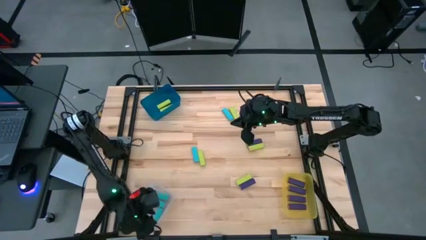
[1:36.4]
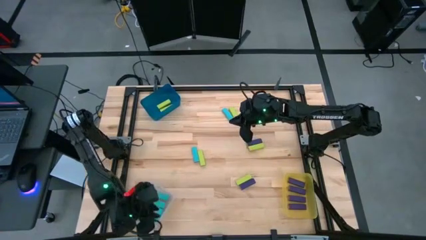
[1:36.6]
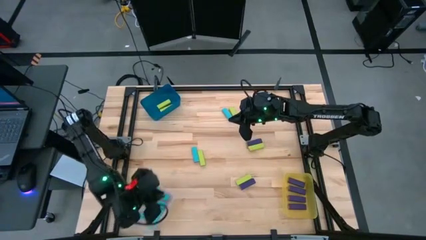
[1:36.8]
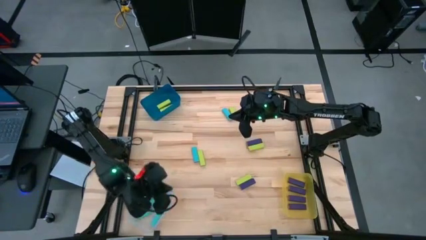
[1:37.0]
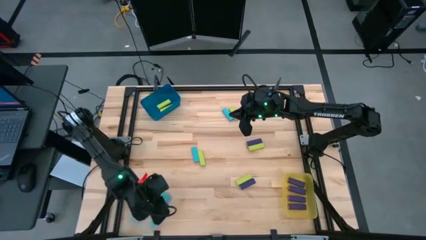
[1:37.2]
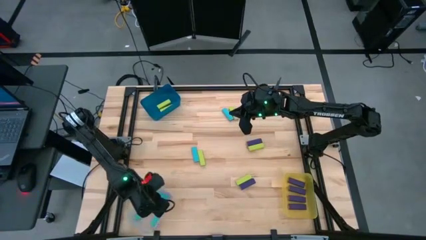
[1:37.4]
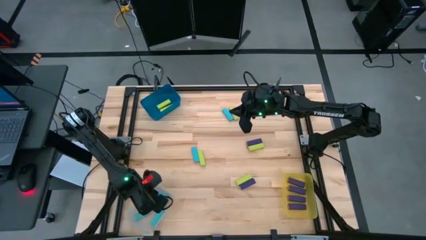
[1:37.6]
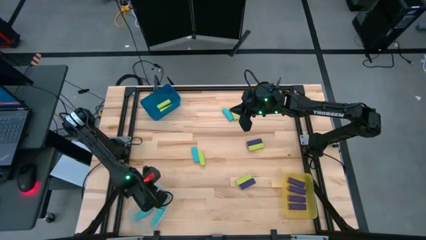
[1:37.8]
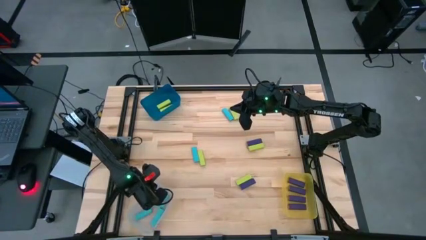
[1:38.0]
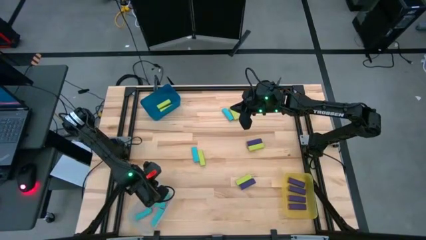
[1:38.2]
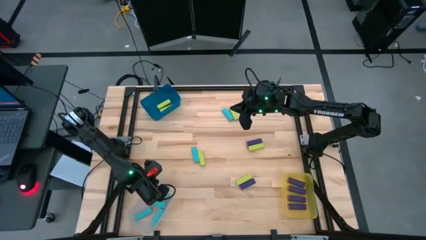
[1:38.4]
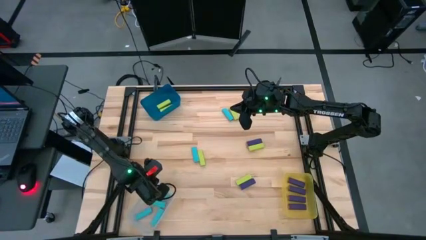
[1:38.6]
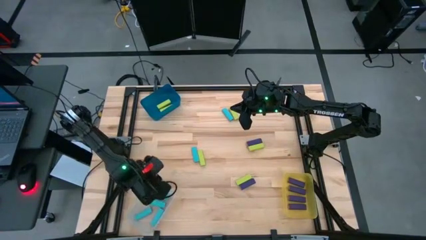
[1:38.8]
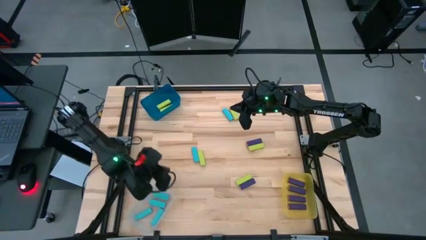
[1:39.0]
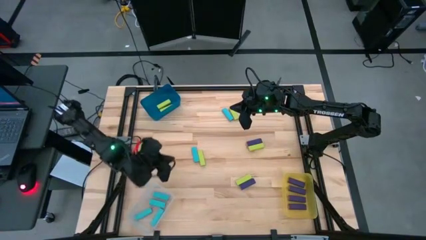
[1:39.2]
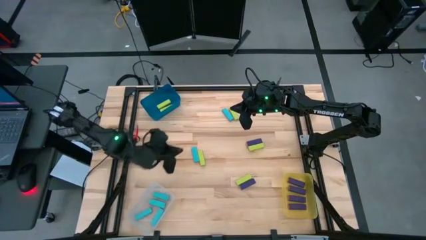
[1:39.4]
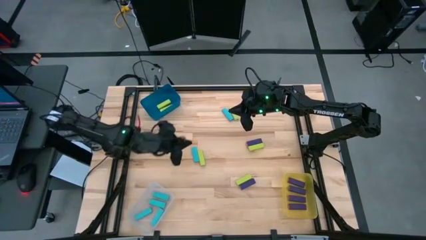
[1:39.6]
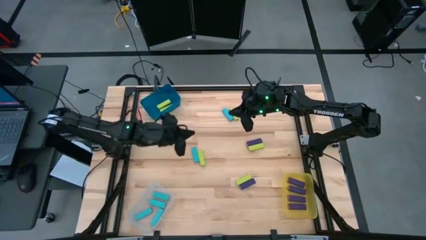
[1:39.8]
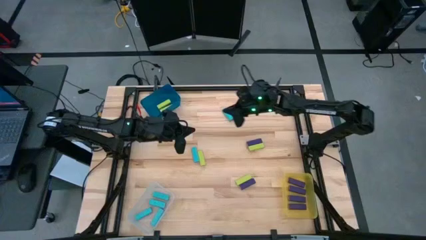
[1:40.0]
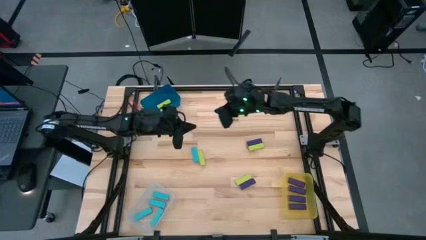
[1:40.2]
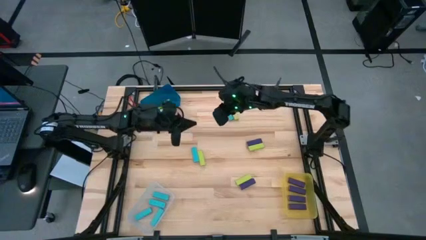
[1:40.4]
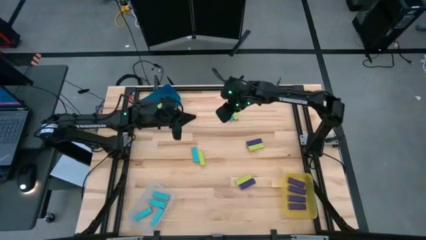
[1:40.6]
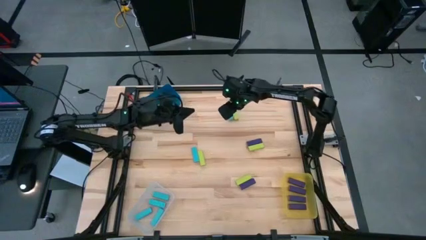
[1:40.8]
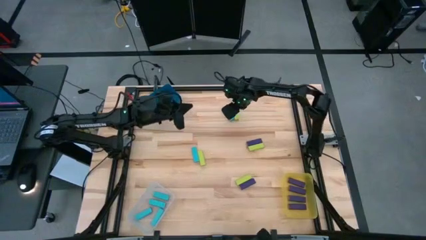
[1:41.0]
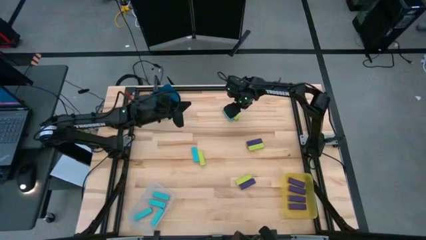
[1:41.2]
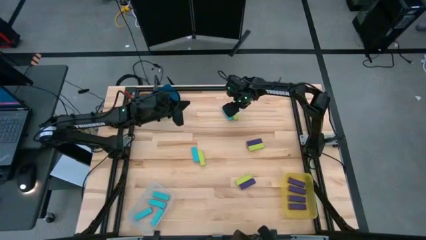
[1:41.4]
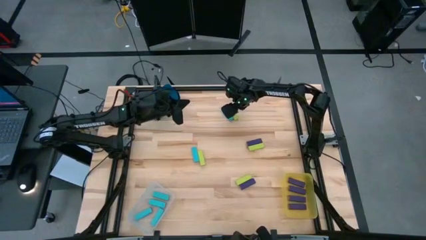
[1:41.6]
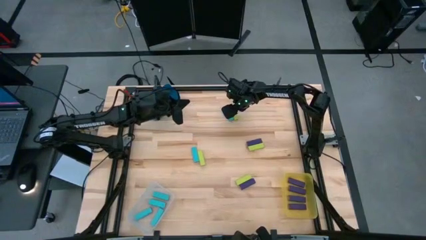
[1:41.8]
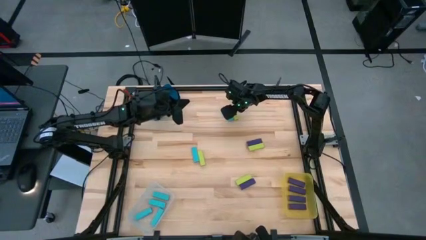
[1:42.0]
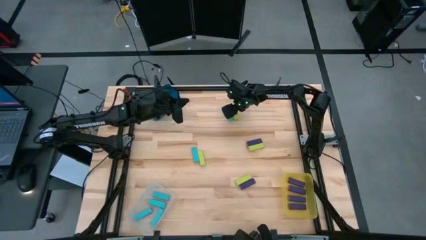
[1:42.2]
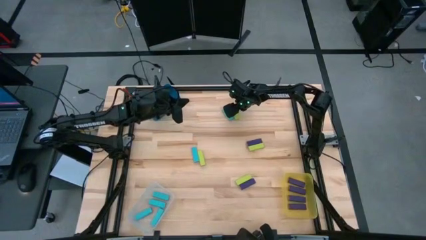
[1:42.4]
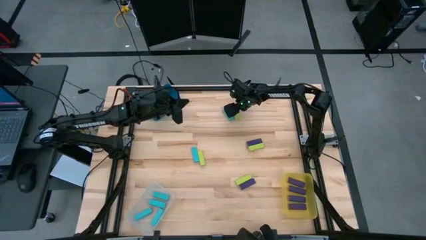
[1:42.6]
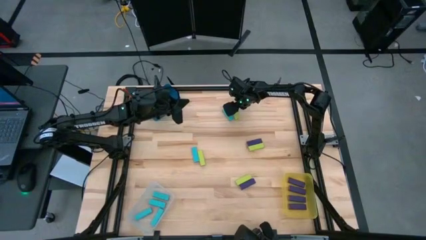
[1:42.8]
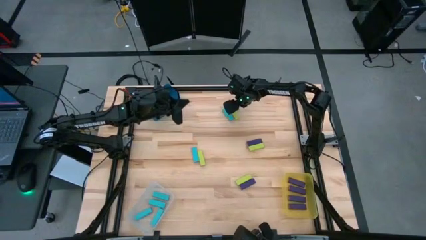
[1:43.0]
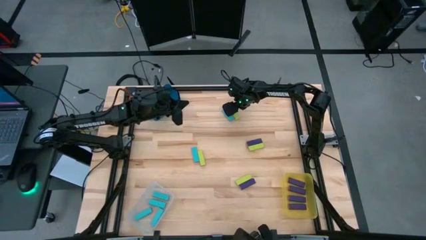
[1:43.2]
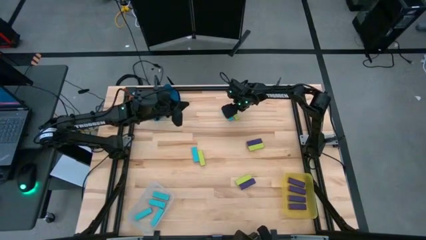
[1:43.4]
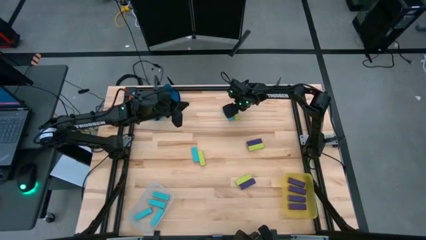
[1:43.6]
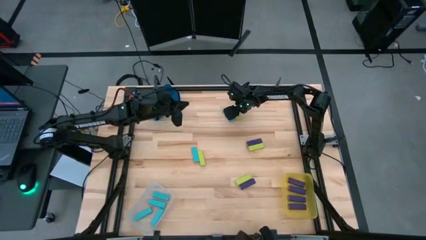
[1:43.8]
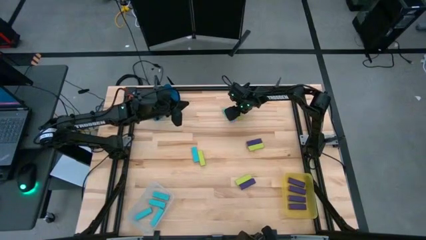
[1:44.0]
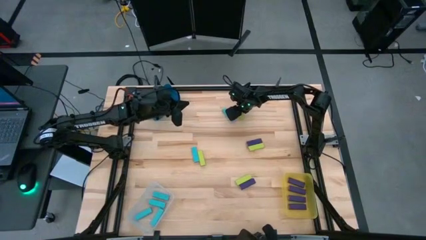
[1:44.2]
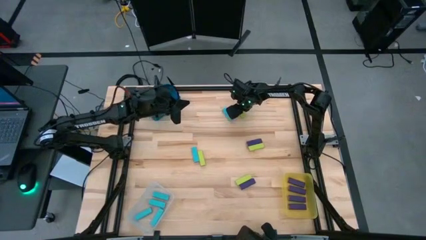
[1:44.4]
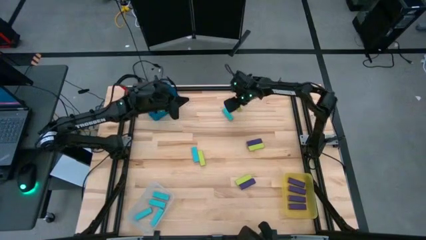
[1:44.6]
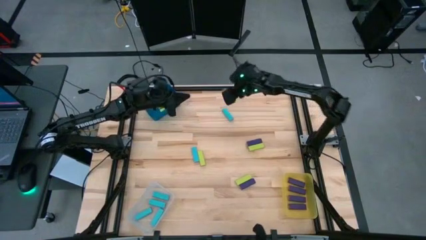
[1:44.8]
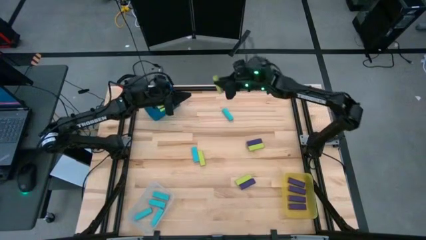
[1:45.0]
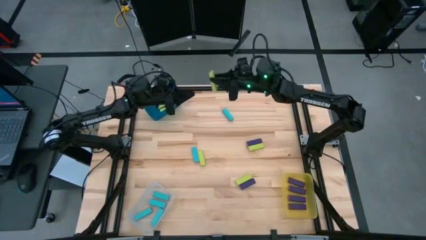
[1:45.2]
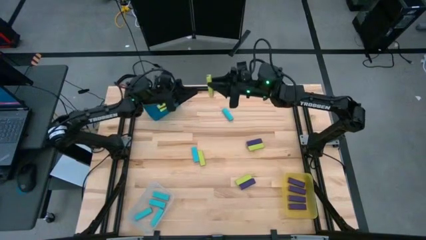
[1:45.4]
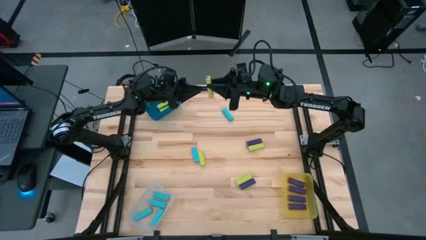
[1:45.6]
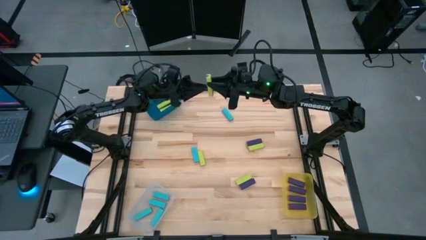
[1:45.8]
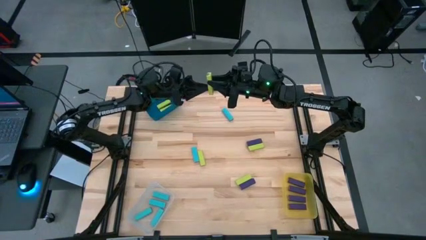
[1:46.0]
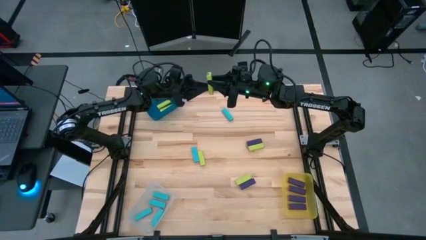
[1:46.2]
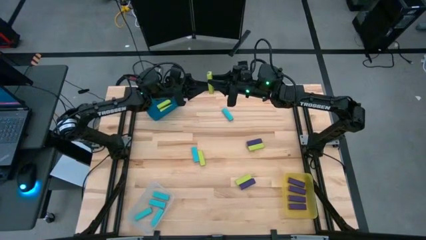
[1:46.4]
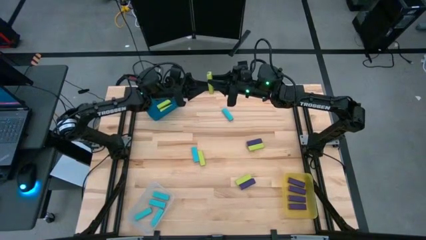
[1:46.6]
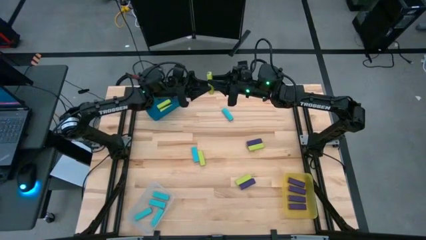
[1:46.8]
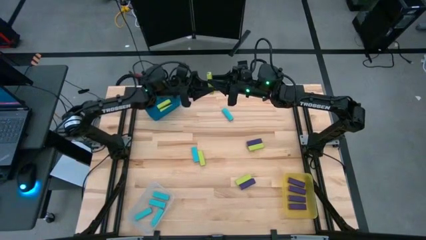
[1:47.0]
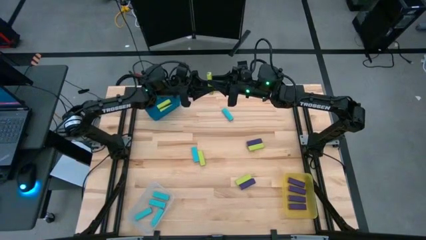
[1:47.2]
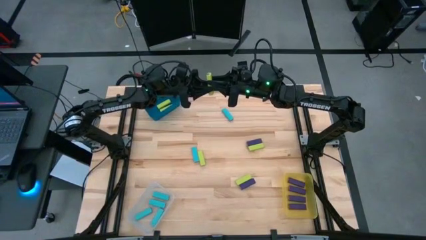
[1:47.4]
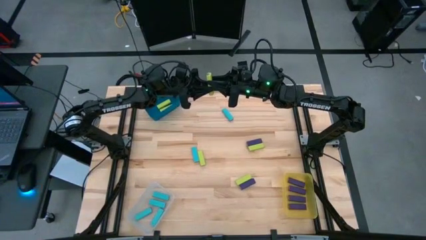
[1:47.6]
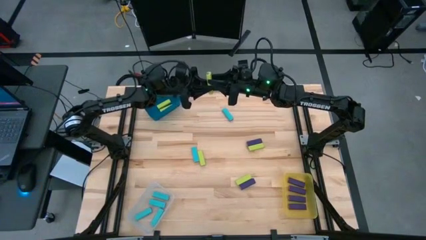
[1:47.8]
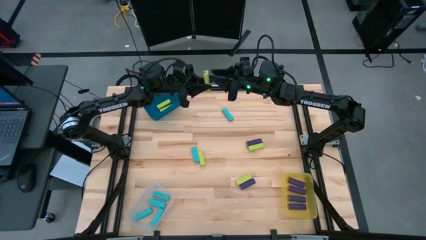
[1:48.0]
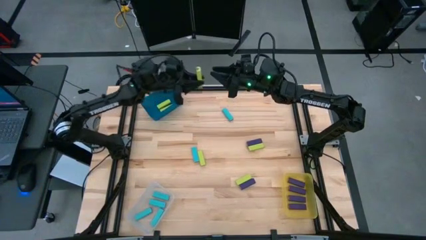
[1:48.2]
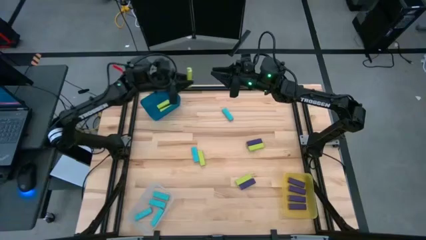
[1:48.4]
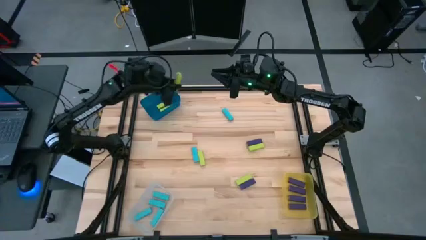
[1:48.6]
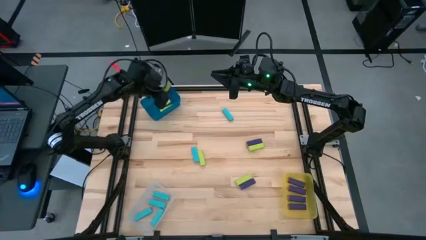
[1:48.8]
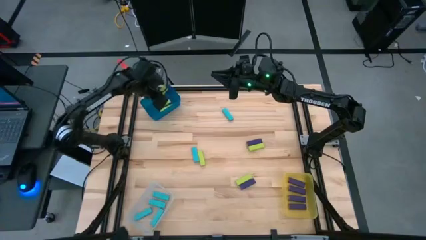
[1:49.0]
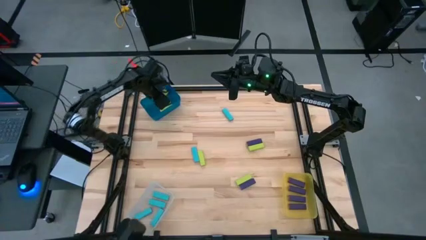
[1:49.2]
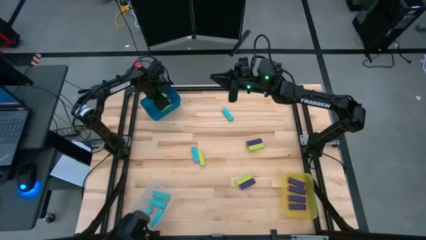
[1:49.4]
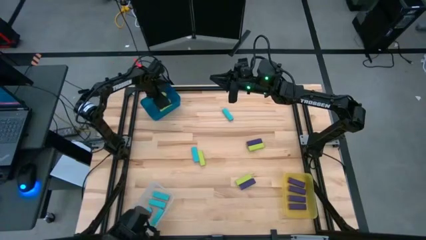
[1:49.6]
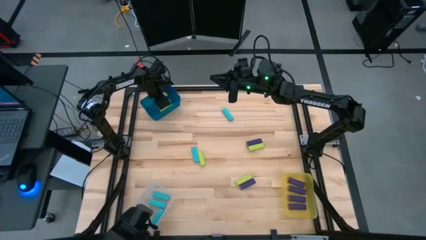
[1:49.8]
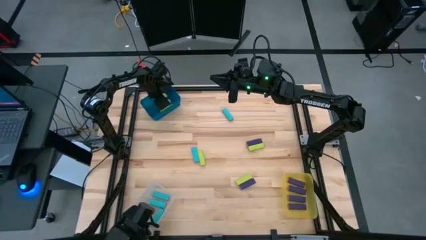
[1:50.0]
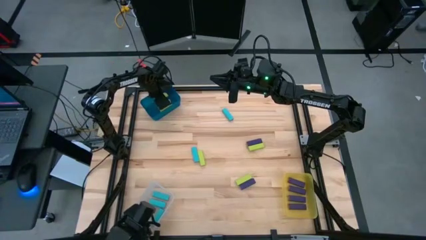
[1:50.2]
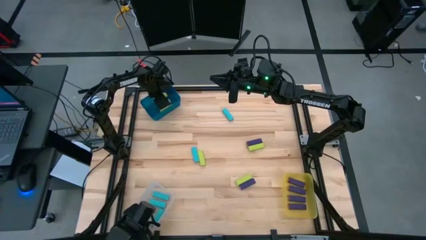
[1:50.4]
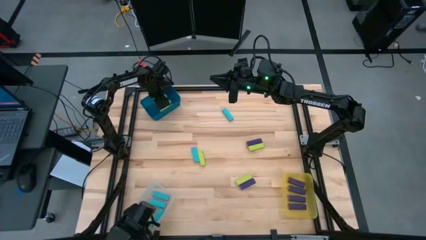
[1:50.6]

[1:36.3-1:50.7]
Task: Sort blocks
Put the green block into the blue bin

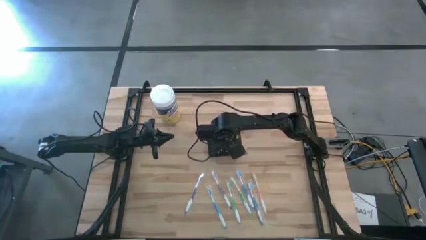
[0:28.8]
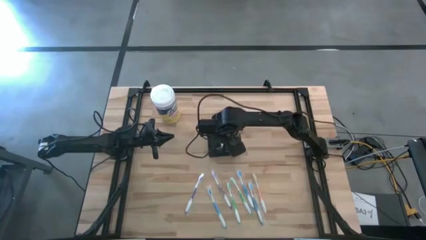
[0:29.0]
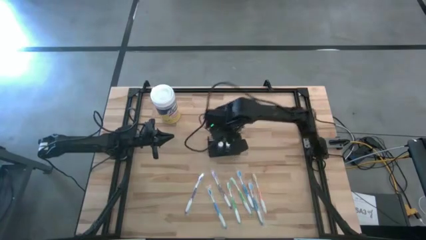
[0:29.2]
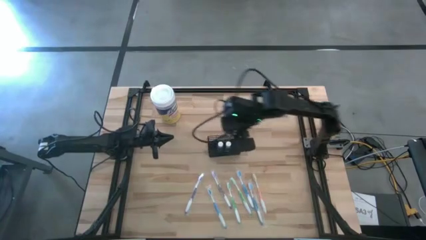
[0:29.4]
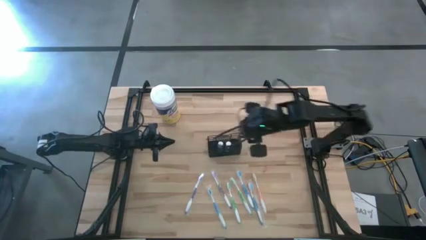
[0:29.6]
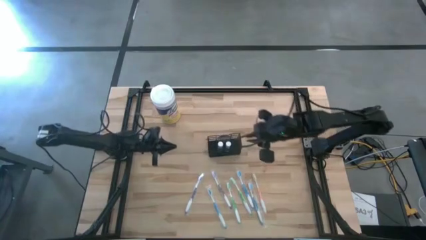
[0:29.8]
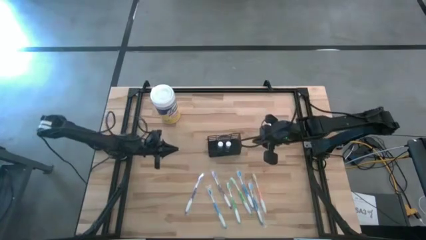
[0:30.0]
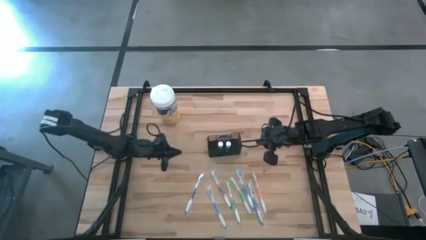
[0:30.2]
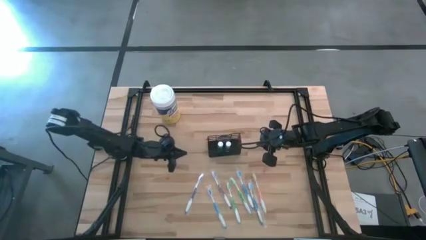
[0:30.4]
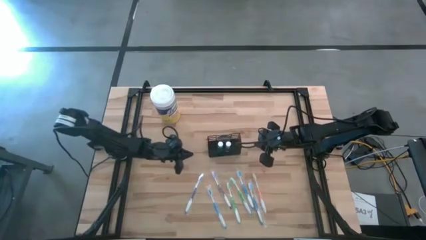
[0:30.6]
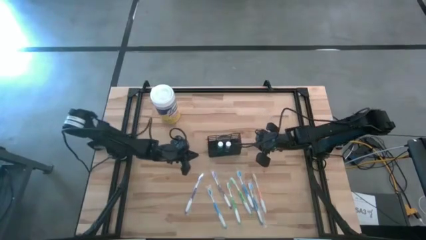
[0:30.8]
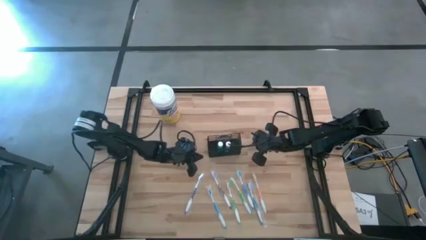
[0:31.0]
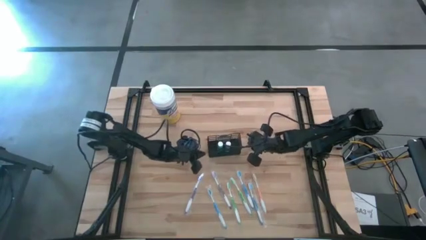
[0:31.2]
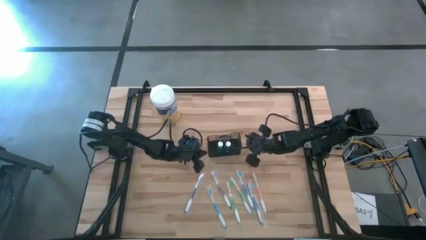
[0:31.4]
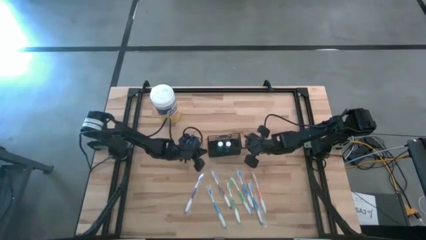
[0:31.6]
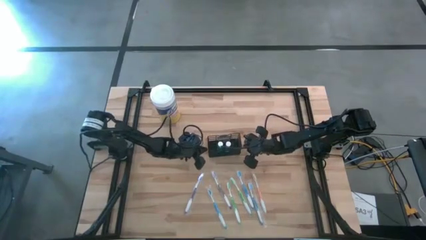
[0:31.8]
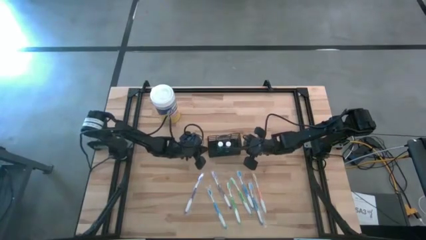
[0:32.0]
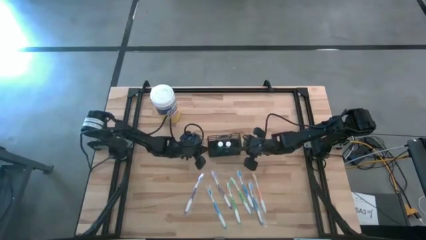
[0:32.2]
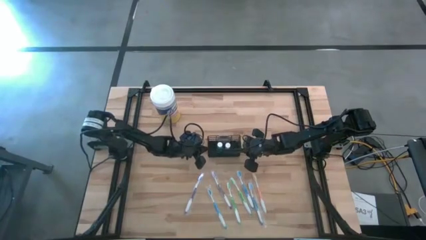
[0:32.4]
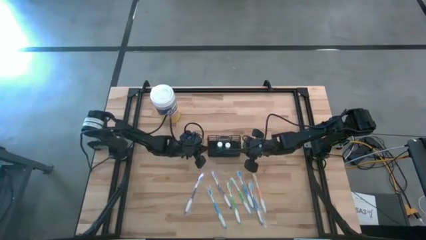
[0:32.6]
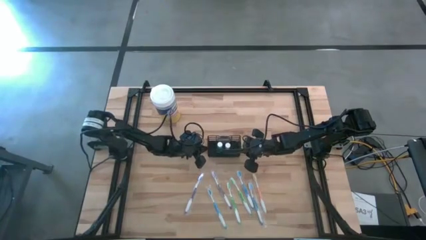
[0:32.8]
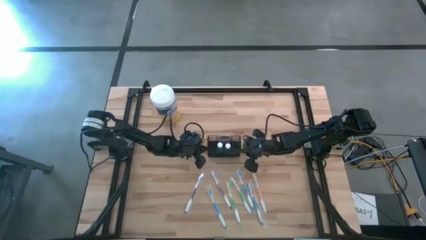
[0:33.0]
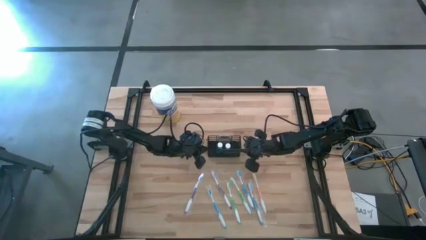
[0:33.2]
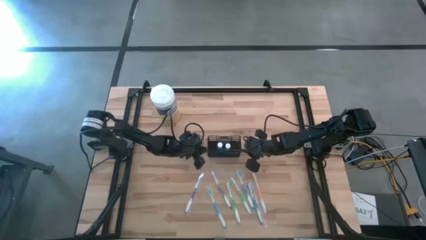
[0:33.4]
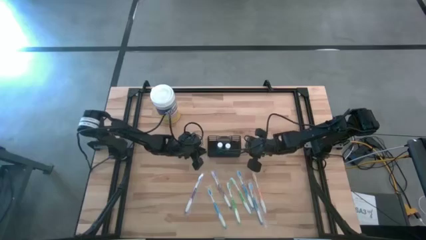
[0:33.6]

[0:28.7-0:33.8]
Task: Pick & Place toothbrushing station
Adjust the wire organizer on the table
